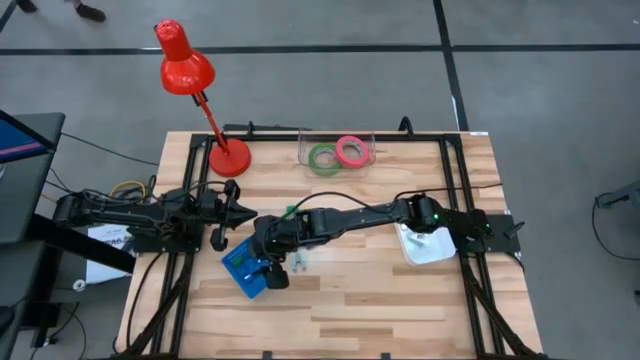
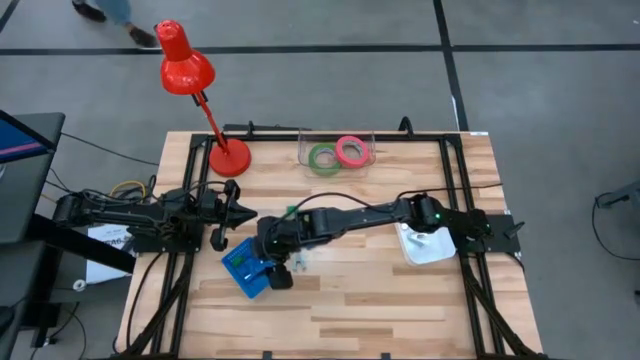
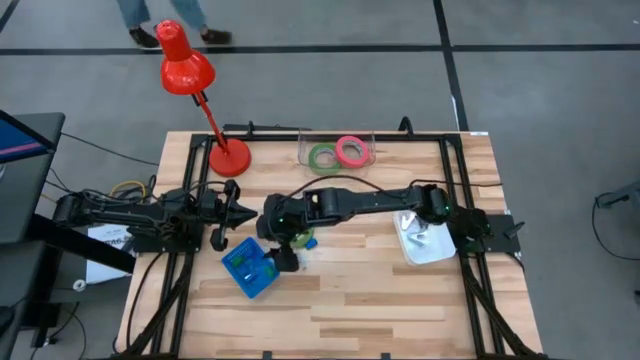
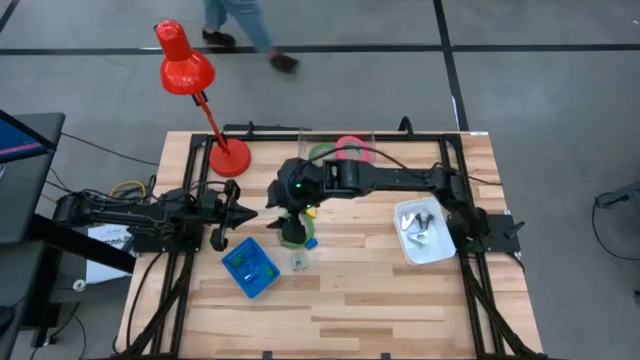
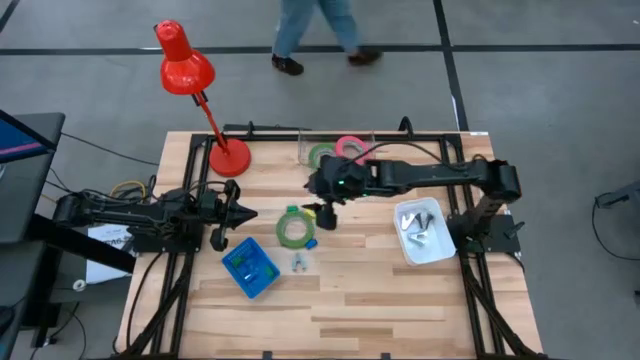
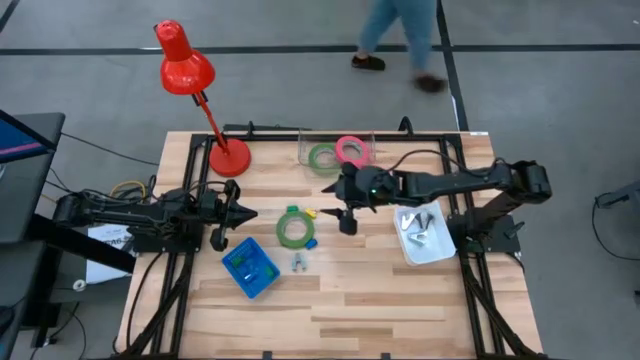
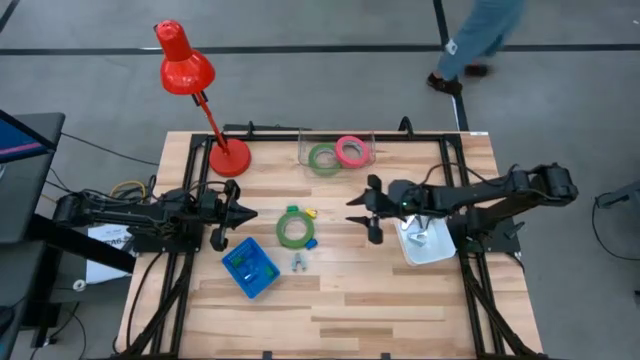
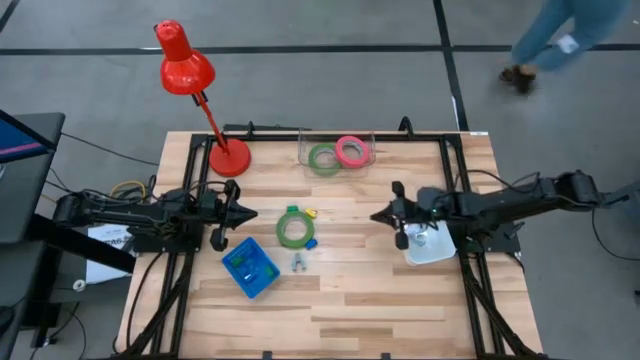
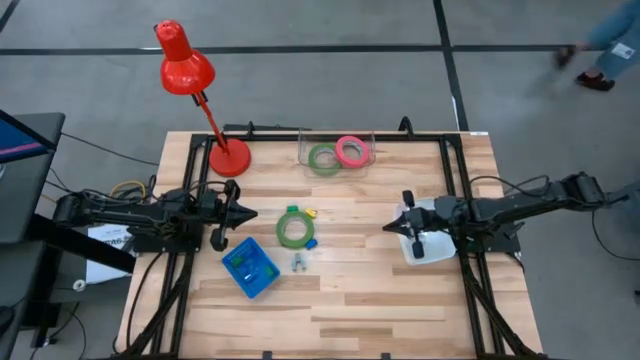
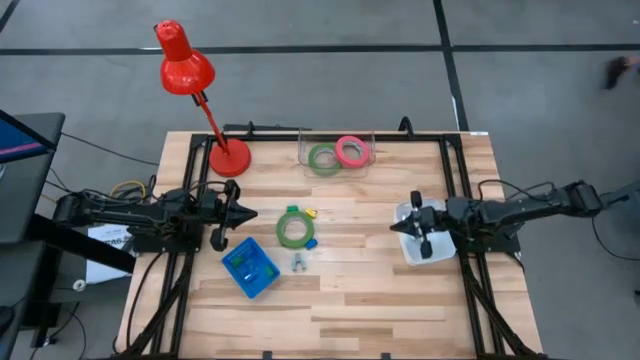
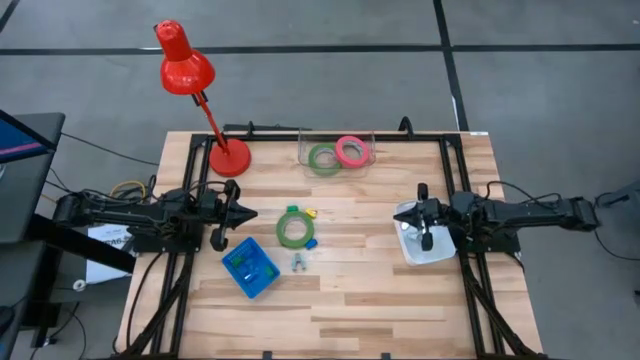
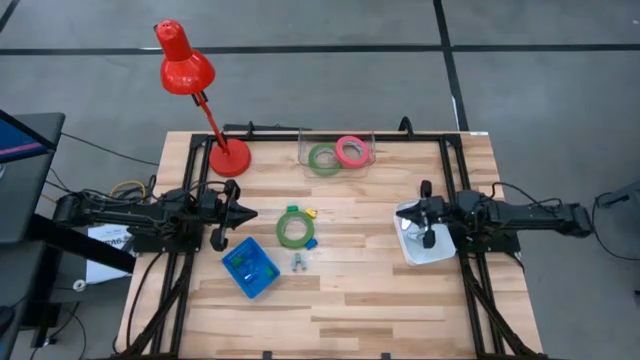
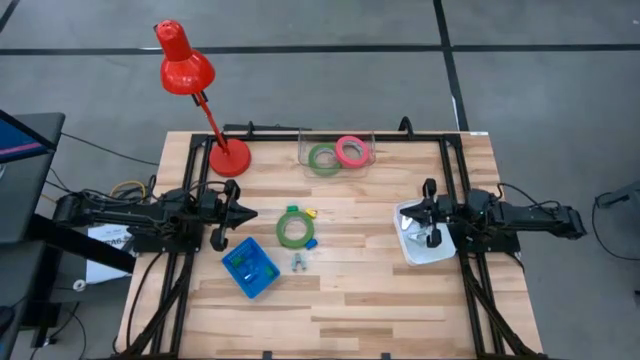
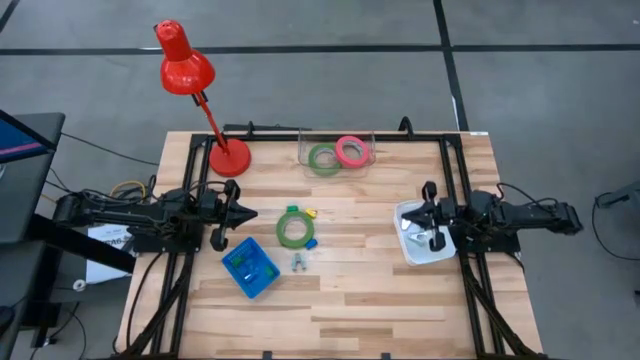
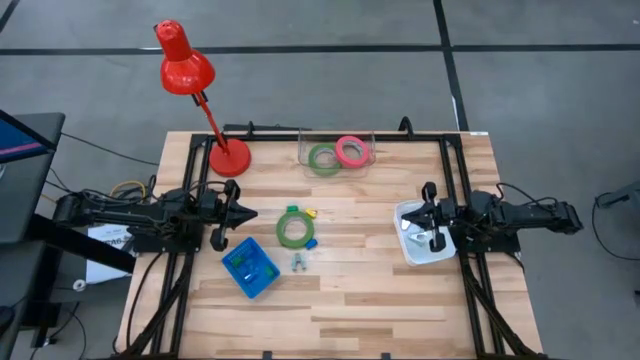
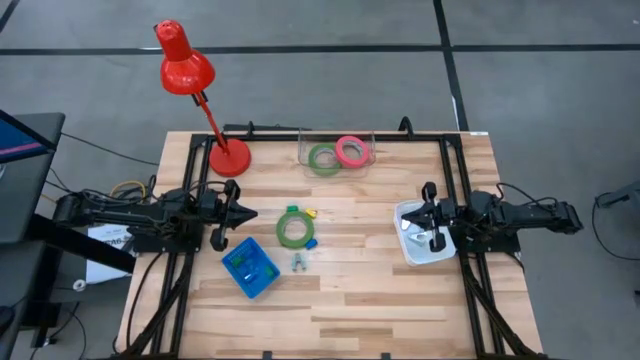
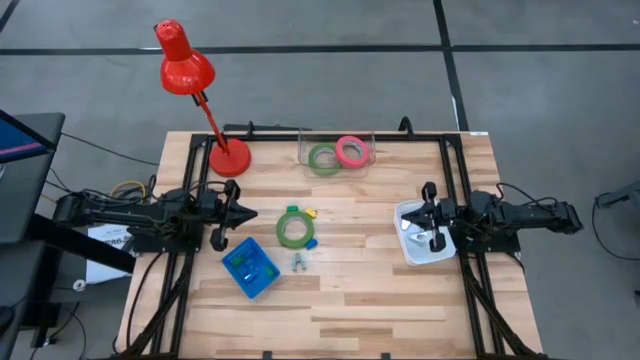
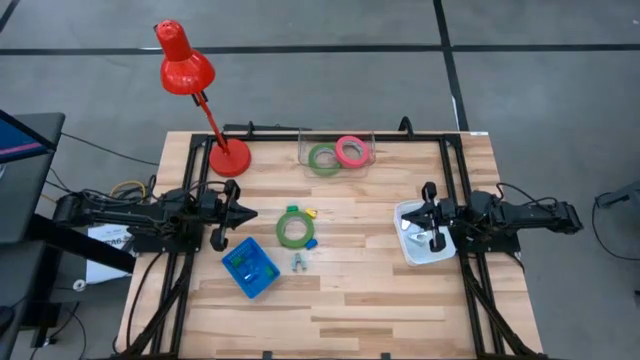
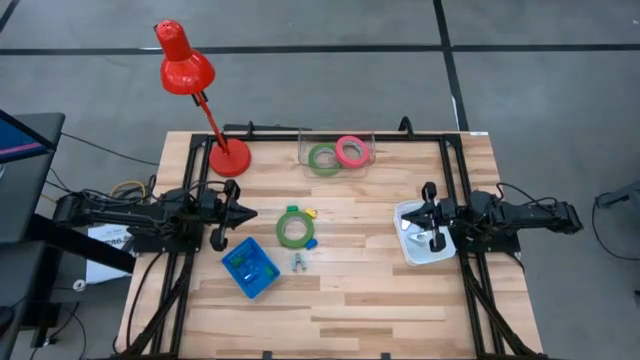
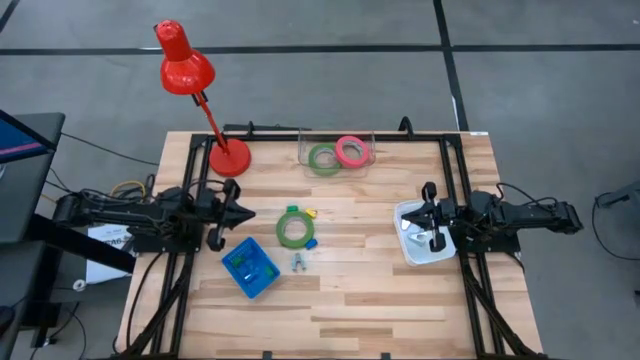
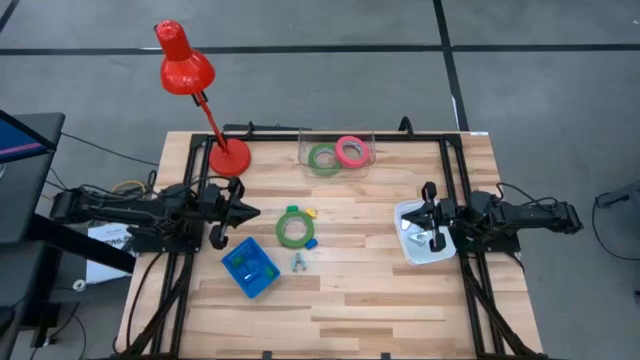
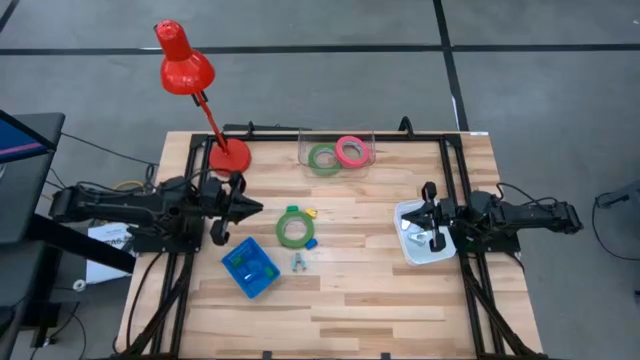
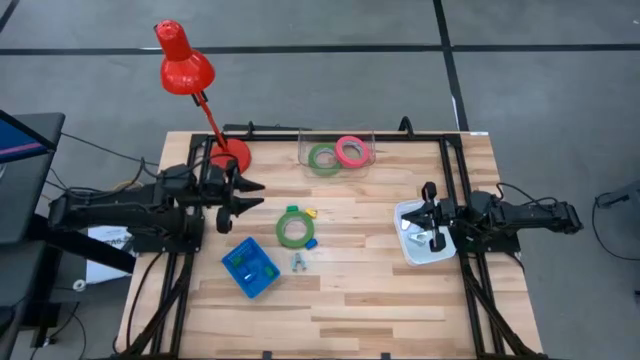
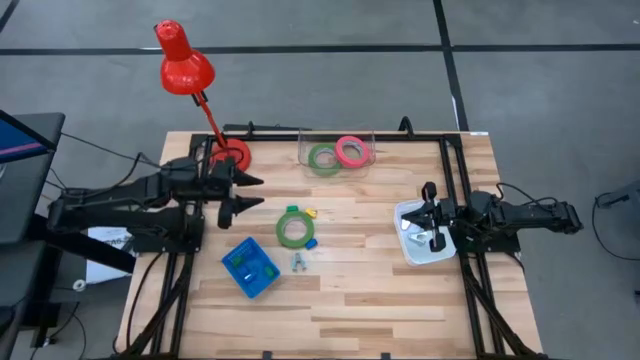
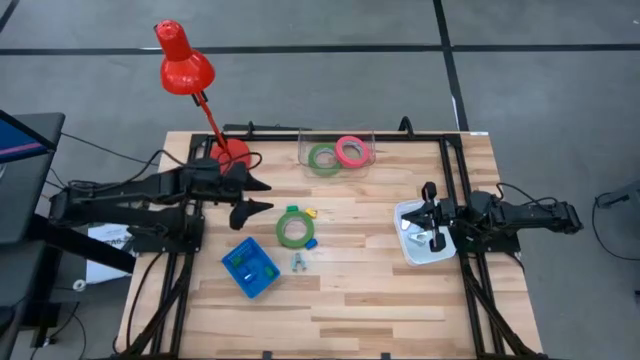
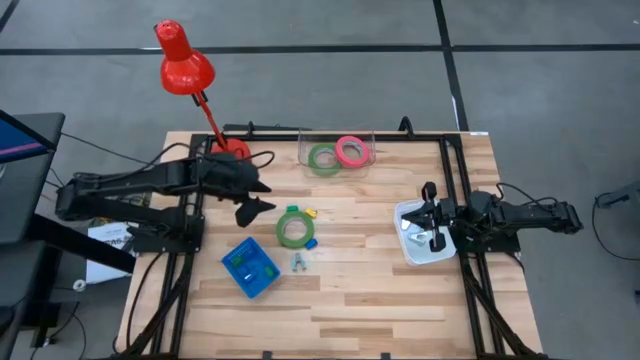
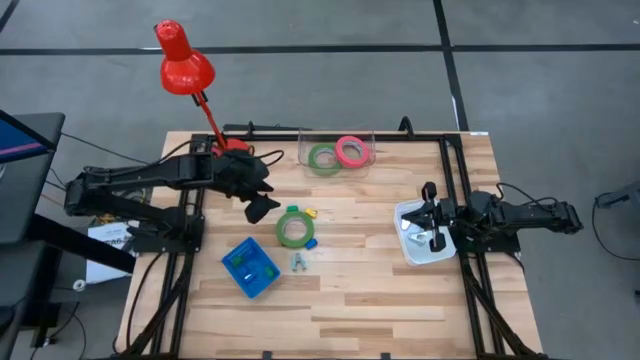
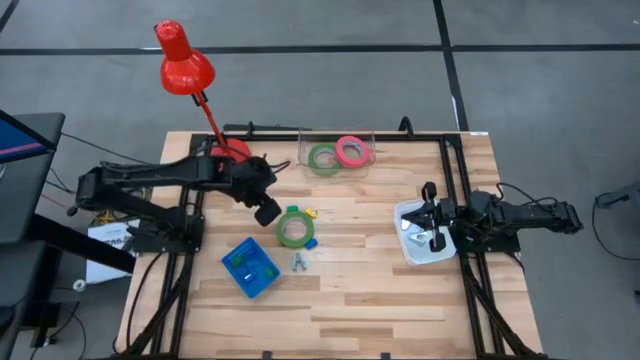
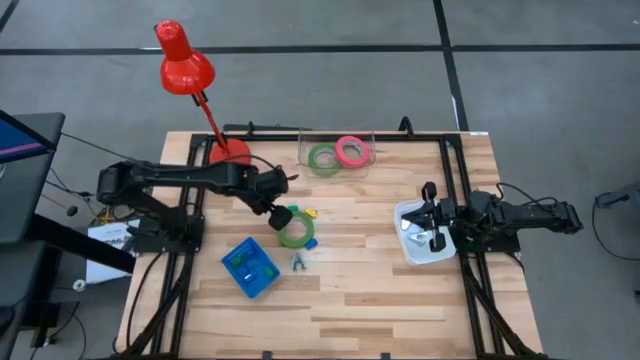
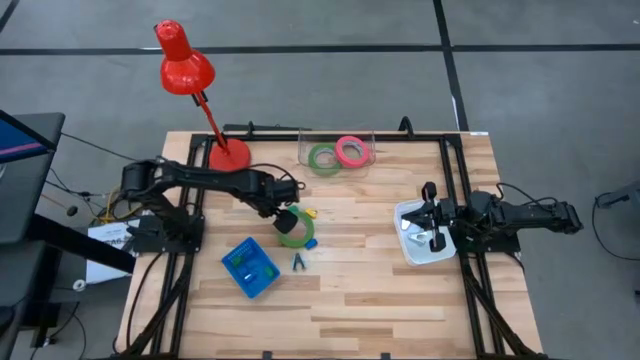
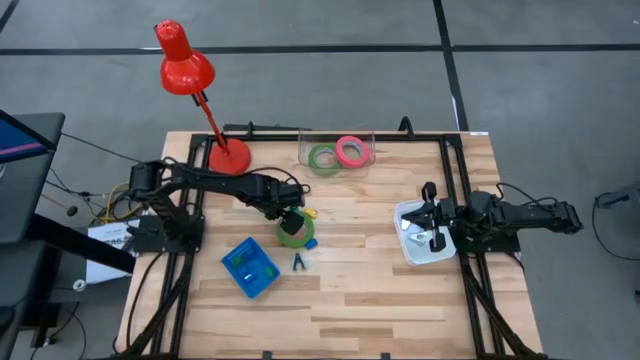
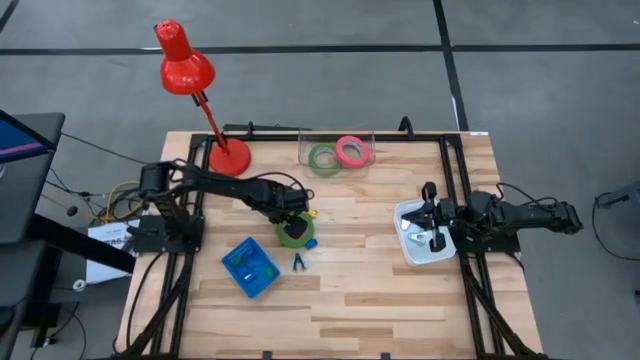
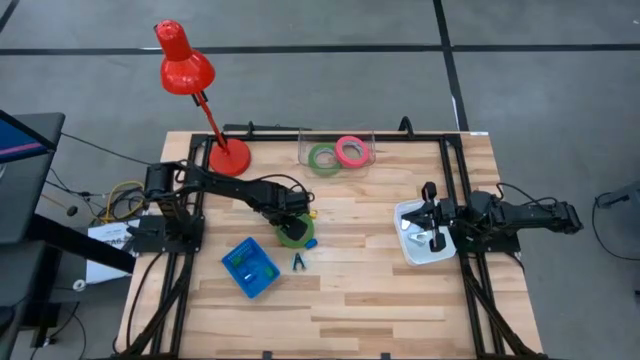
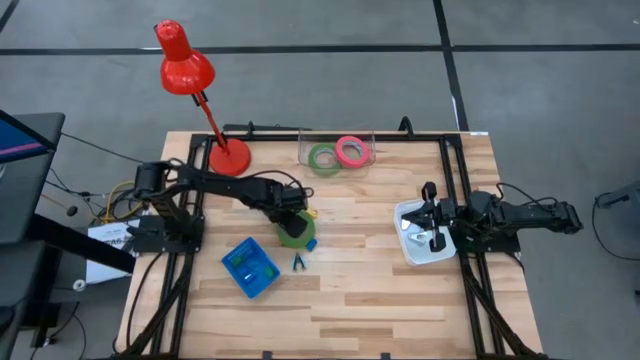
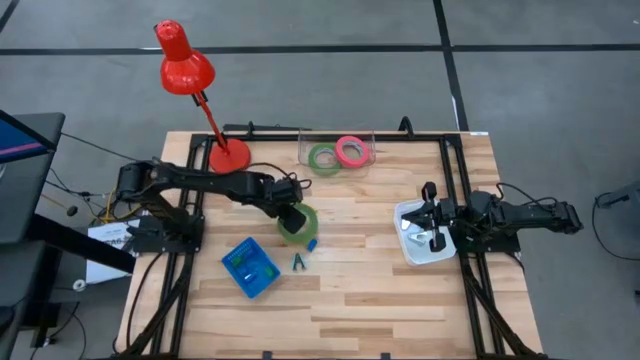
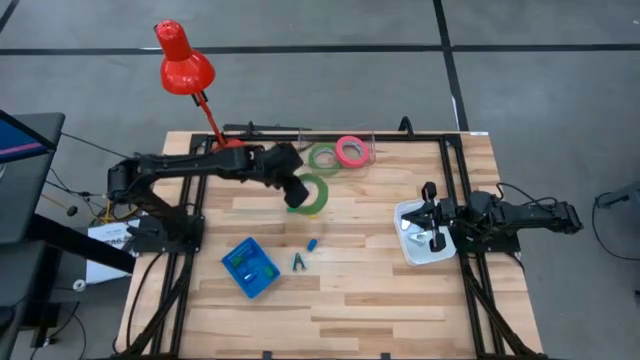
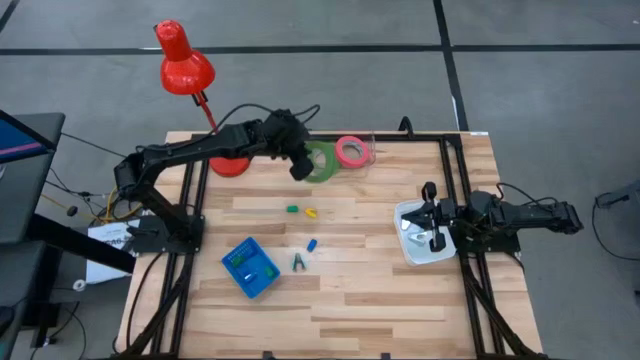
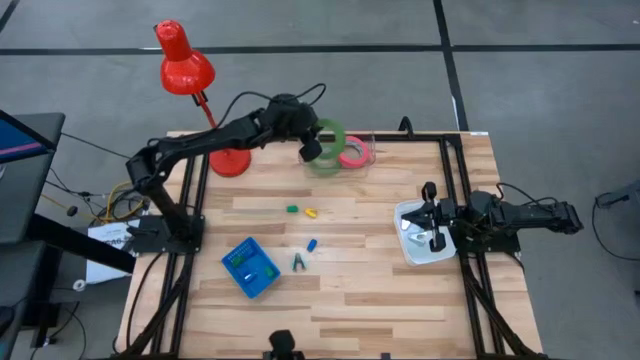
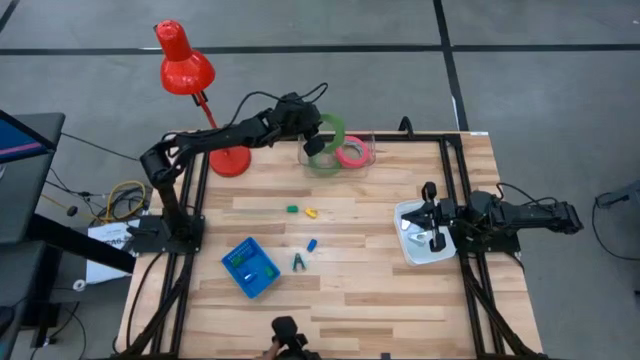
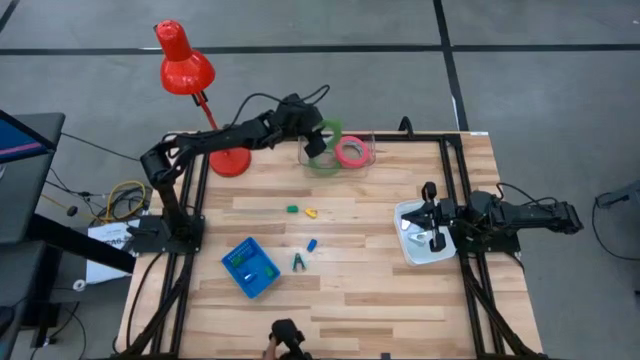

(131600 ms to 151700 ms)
Task: Pick and place Stapler, Stapler remover, tape
Put the green tape into the transparent bin

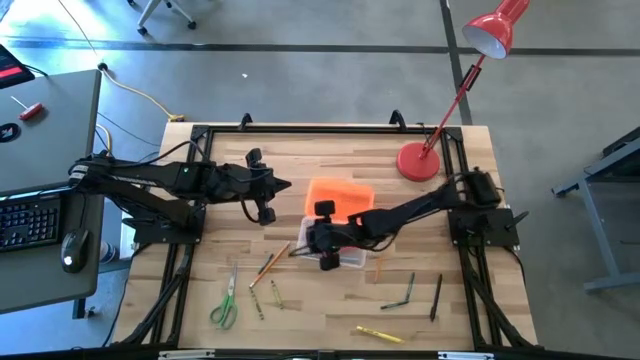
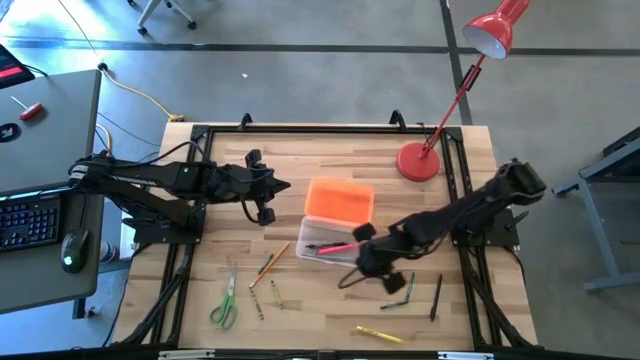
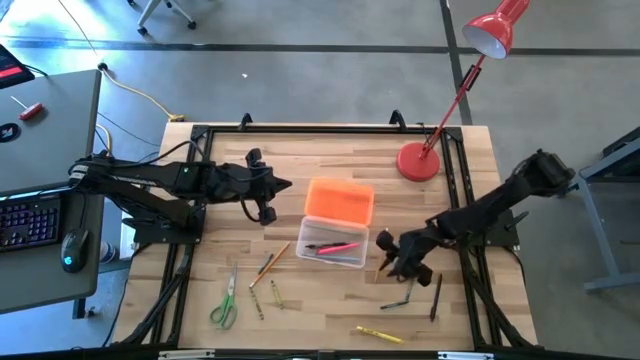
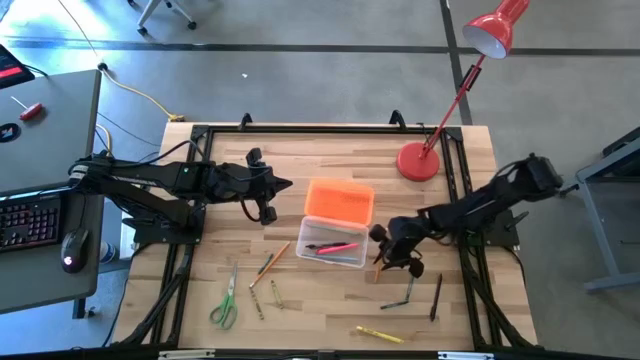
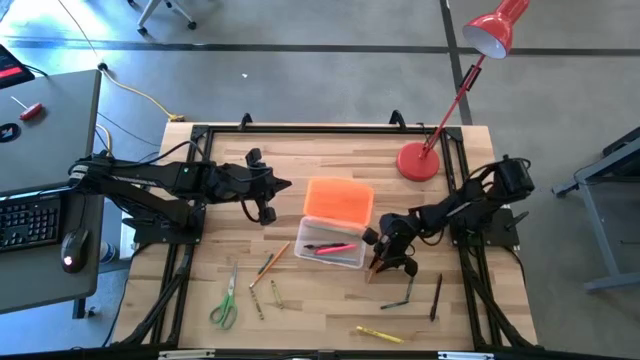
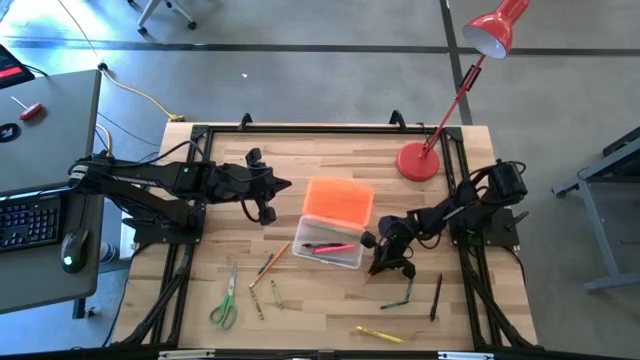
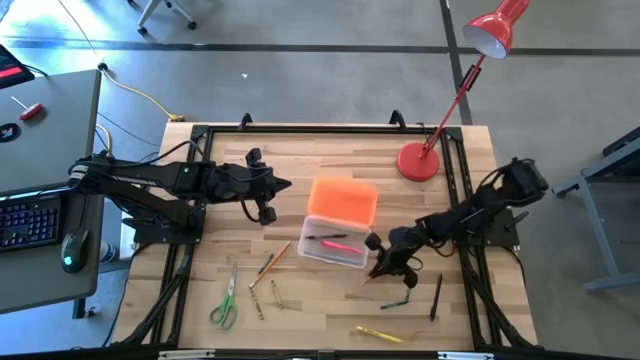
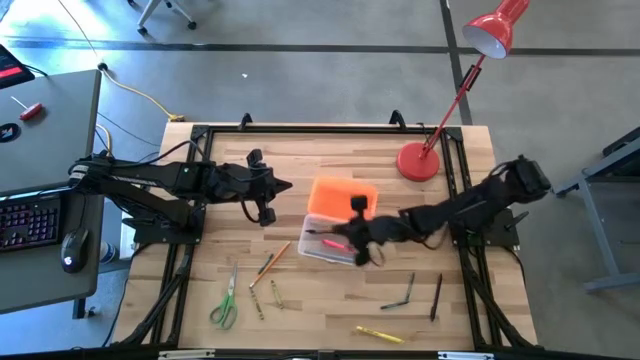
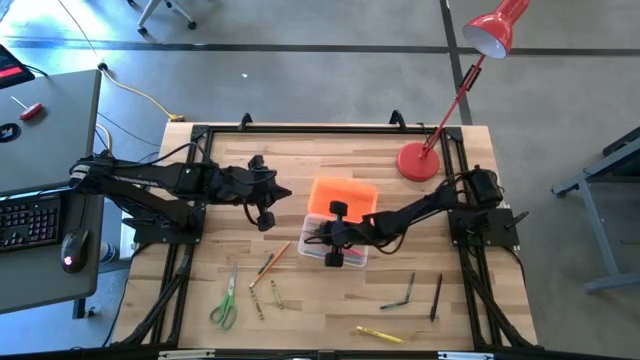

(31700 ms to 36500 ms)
Task: Pick & place school supplies into a supply box
Put the right orange pencil into the supply box
